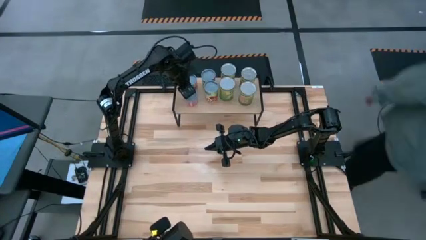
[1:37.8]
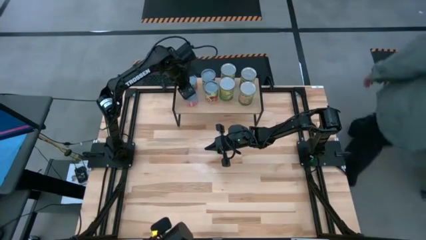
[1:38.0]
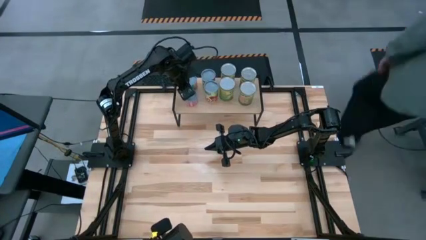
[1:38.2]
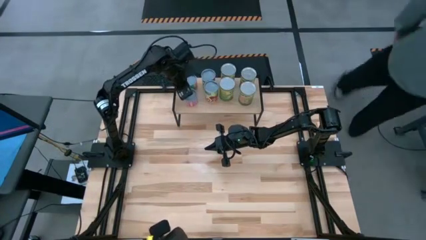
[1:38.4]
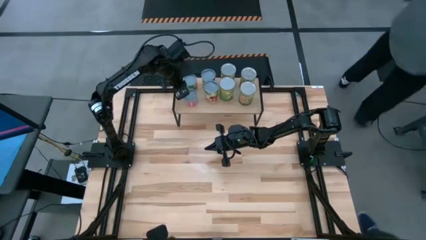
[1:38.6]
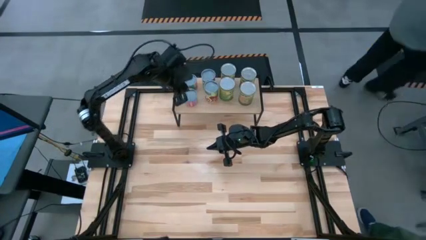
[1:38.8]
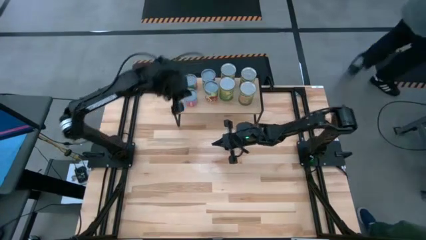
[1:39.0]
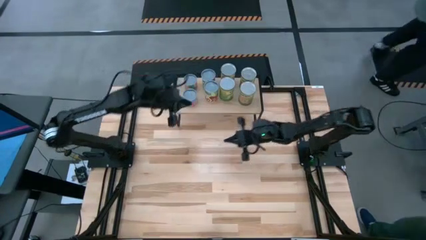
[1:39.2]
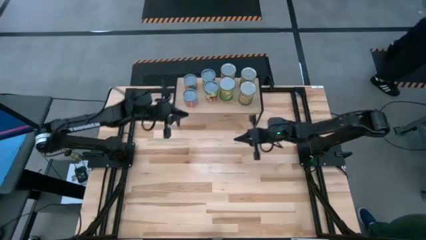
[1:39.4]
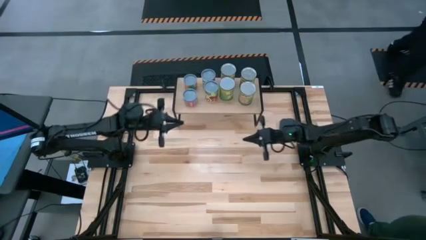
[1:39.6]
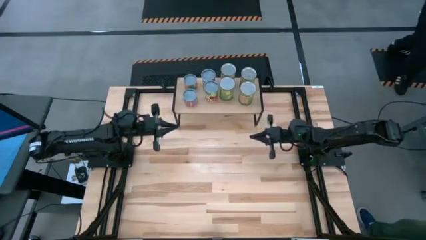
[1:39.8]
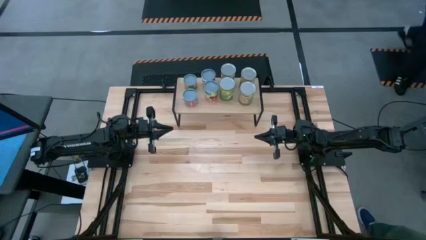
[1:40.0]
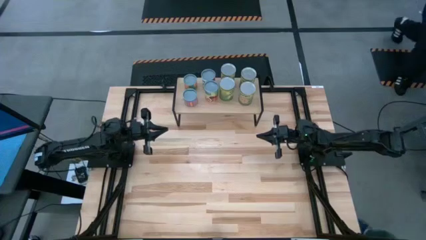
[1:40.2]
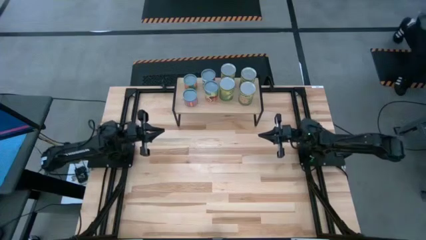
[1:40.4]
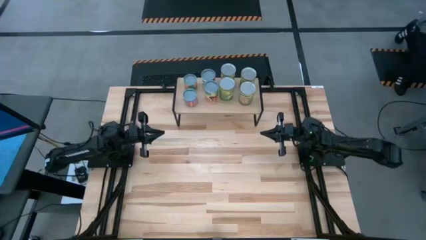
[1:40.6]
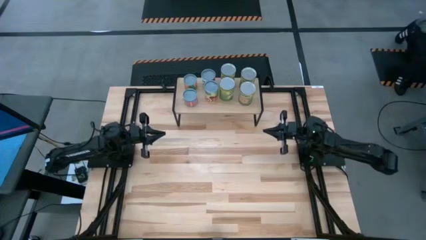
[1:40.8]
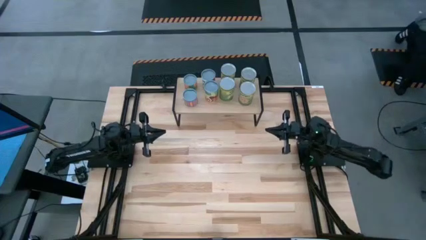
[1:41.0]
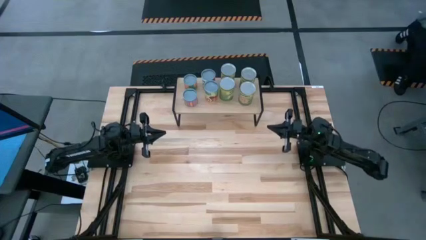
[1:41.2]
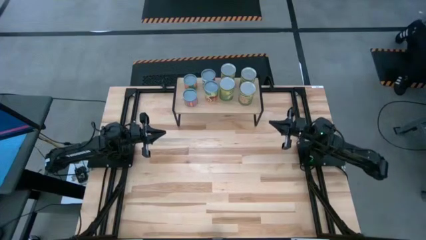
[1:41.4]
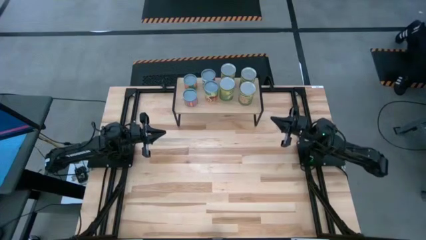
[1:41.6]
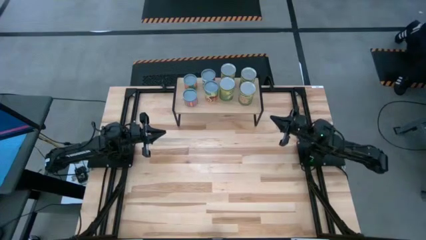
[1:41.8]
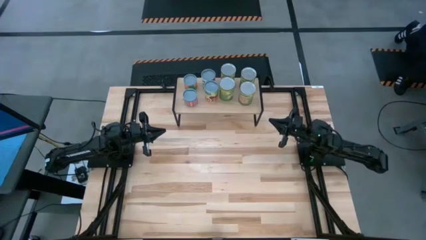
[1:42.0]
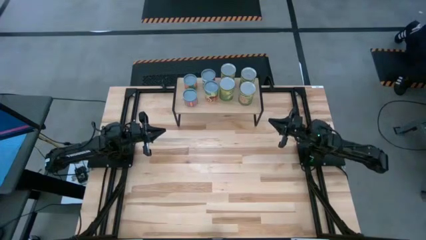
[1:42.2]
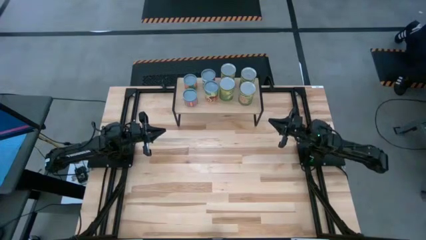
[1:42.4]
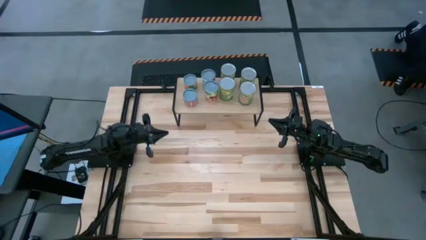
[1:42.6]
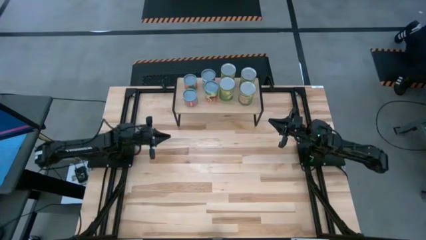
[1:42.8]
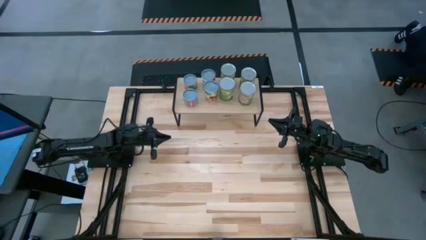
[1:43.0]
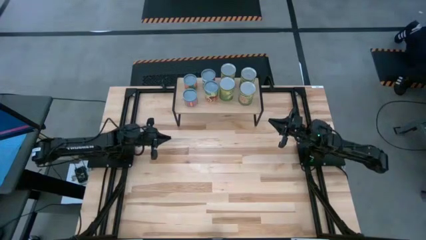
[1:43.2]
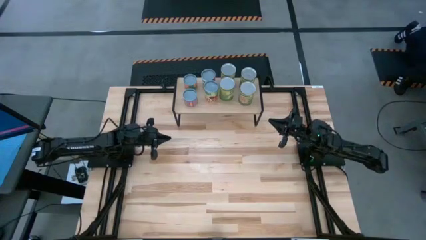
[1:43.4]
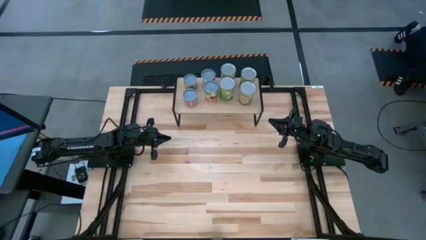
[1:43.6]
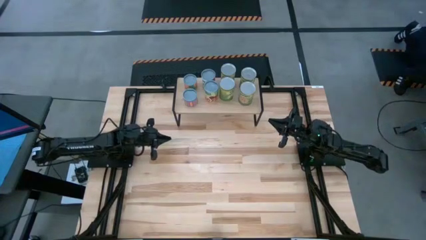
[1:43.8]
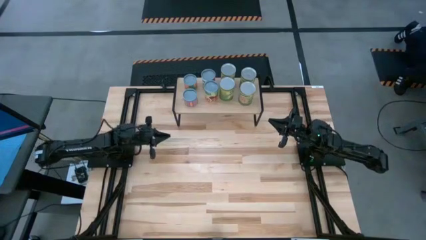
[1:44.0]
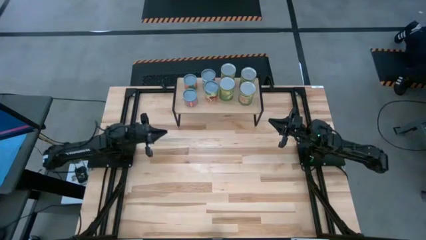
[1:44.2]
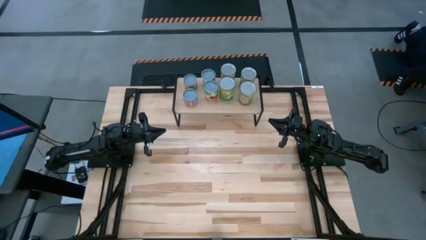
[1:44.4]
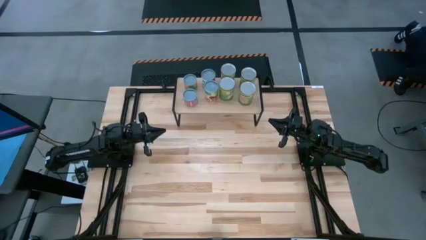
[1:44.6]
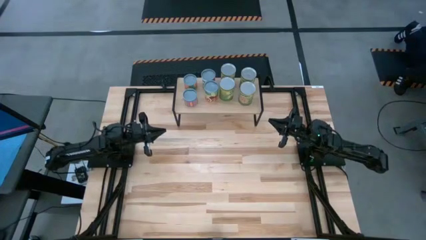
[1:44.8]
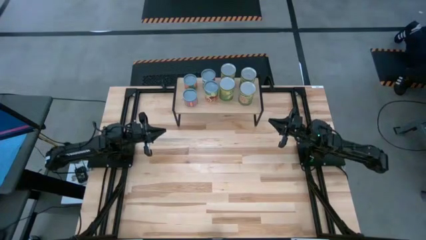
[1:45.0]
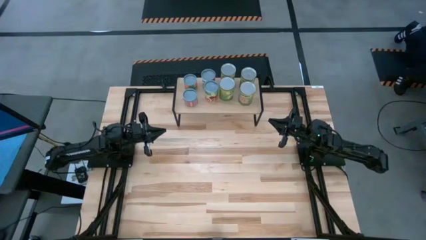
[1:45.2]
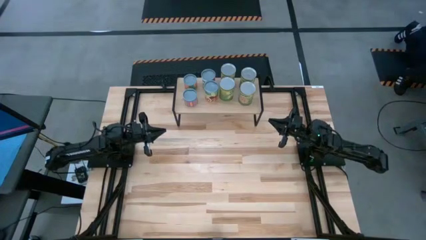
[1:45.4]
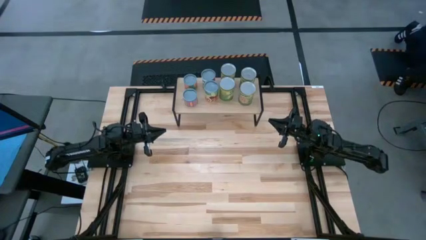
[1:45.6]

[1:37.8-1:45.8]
Task: Pick and place cans onto a shelf
Return to Home Position
